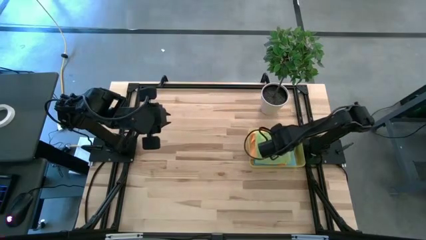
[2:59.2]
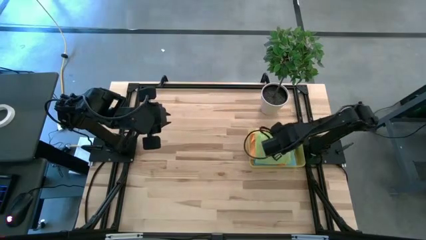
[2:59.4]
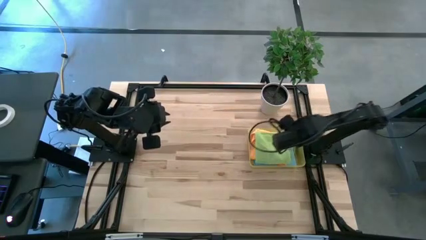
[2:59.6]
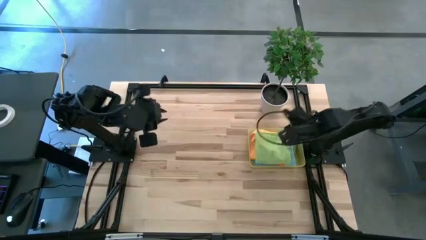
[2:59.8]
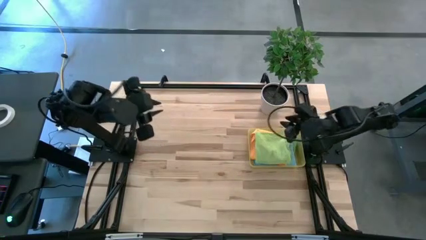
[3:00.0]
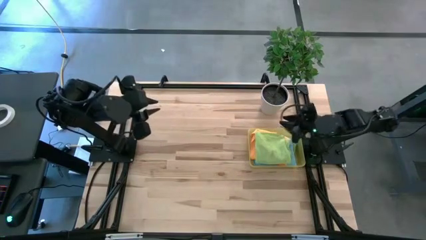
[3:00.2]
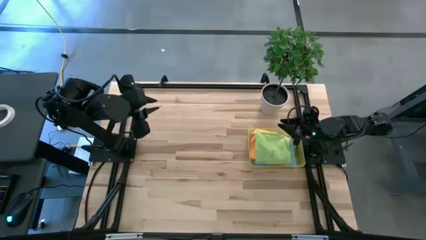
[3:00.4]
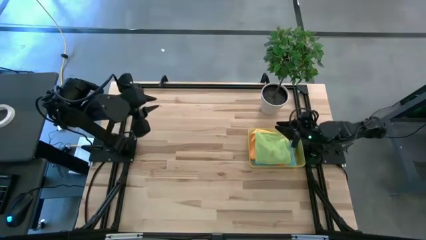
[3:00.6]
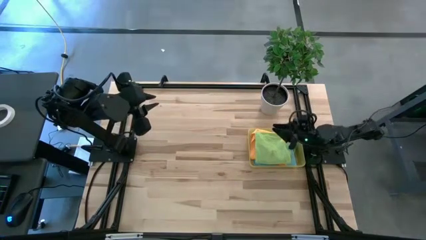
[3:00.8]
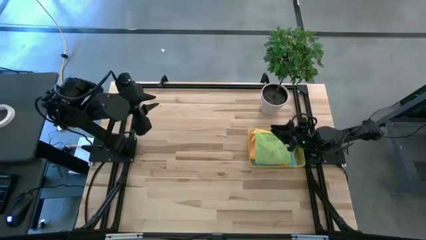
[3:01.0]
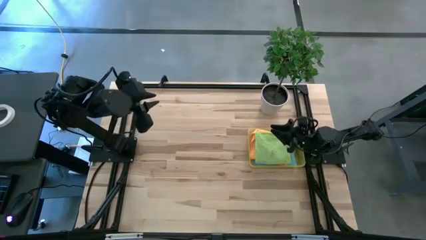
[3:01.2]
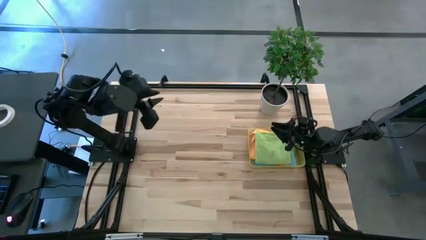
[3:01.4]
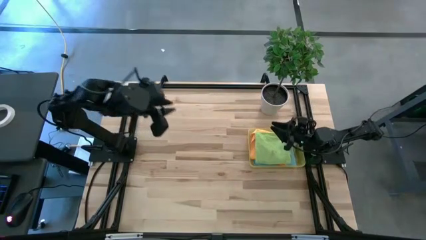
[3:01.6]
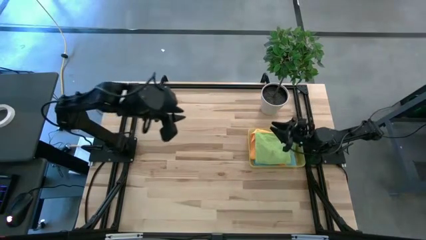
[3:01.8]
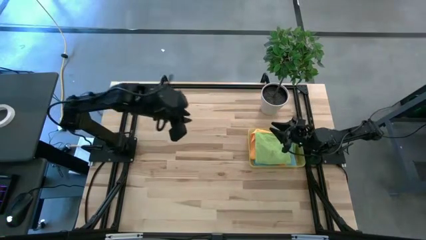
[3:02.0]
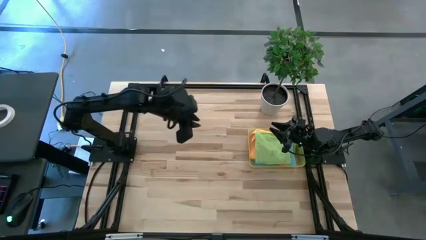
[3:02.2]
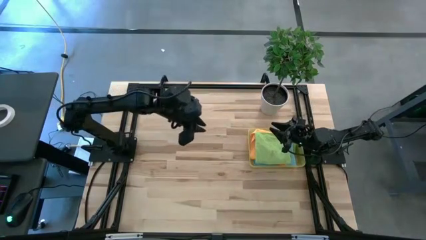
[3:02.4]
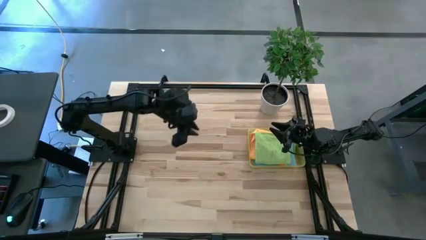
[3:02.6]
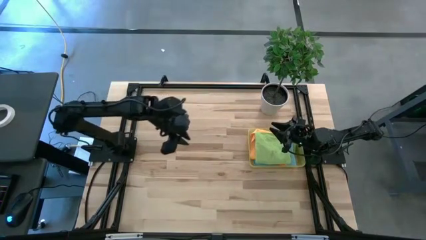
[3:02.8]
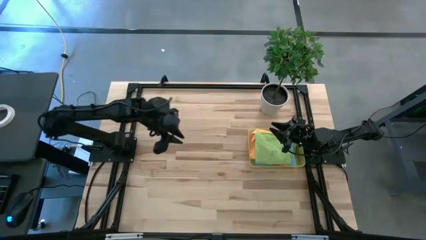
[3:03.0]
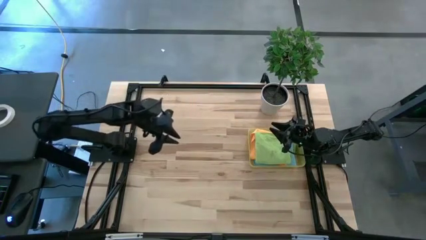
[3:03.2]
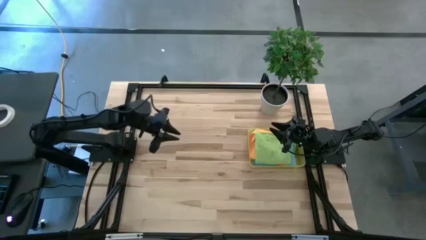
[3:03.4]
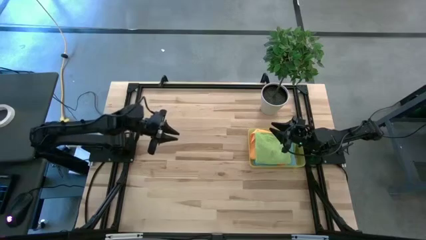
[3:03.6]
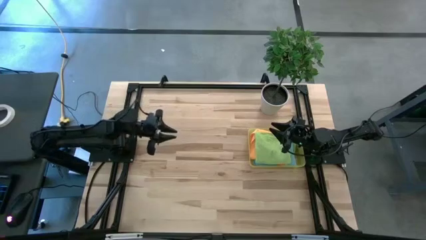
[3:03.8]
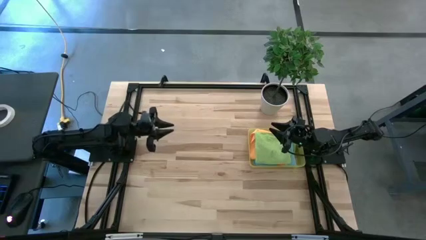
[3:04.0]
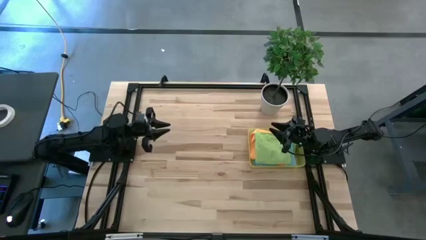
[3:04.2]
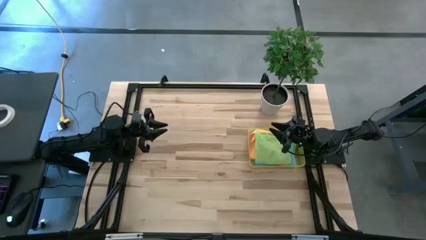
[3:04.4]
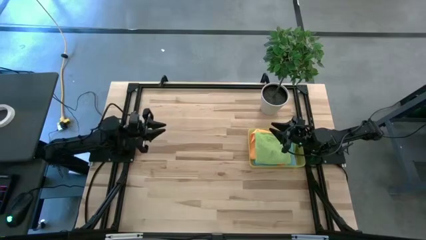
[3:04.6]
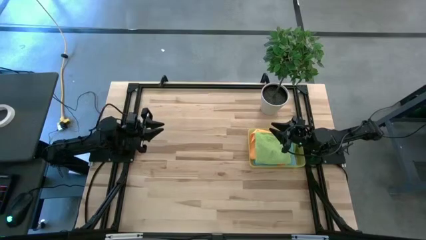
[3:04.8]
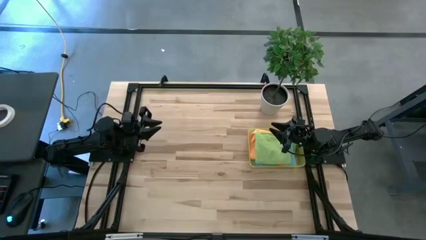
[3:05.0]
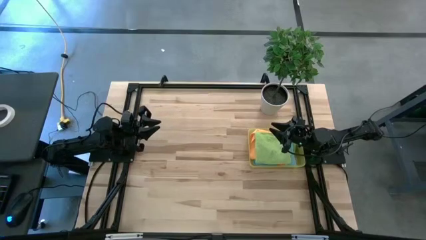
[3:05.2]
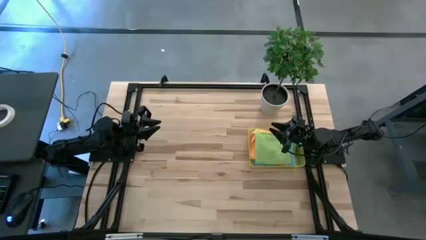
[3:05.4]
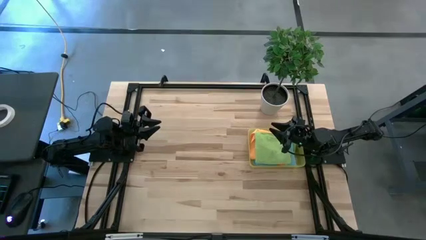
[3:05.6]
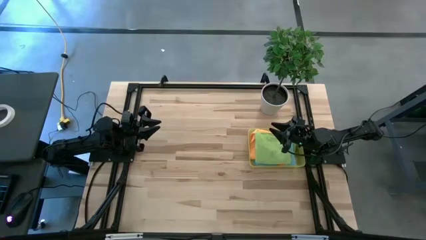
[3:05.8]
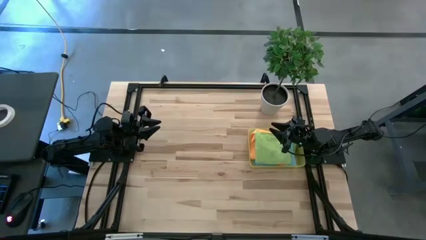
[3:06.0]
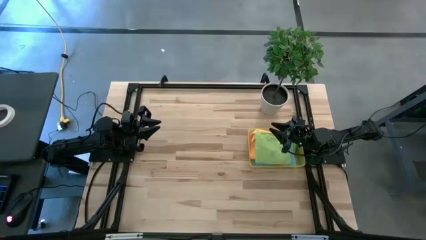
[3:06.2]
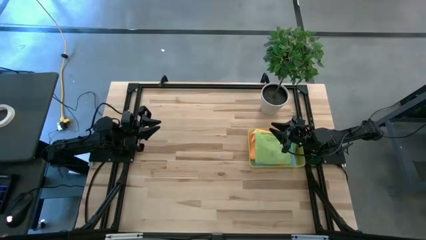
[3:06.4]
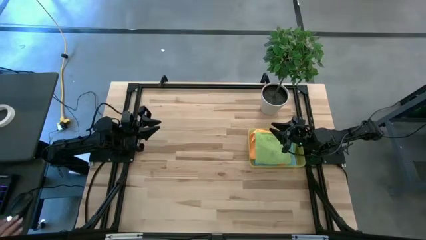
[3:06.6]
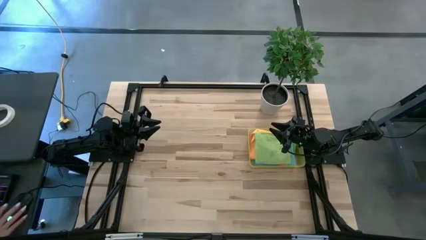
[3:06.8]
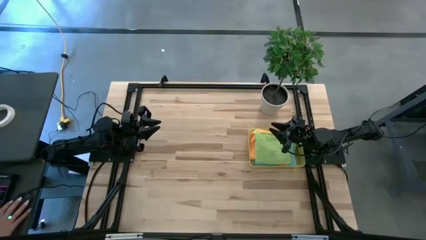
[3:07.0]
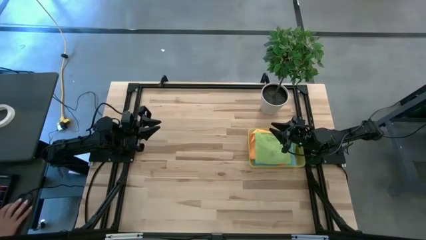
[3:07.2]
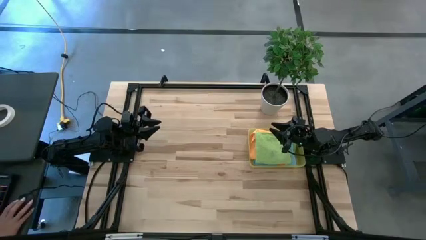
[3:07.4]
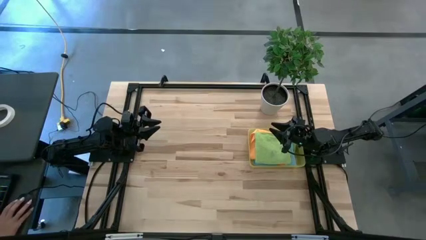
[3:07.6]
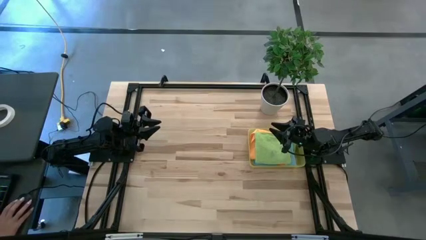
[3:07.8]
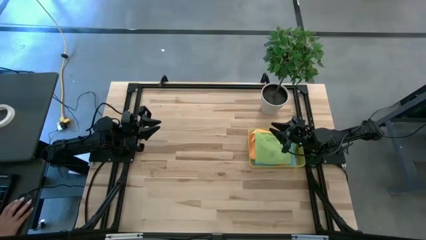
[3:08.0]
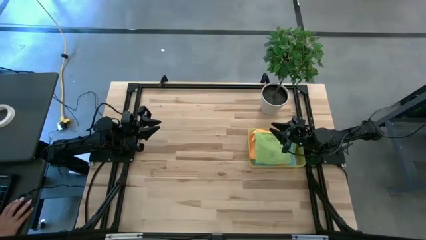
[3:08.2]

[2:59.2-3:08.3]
Task: Fold microfiber towels
Return to Home Position

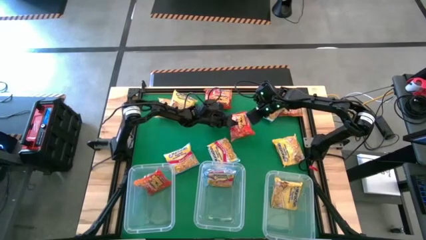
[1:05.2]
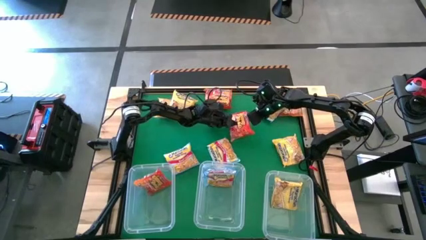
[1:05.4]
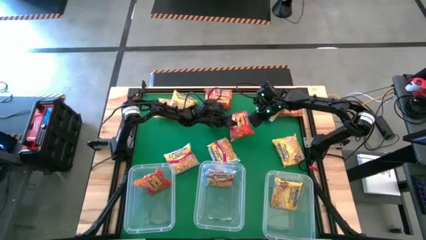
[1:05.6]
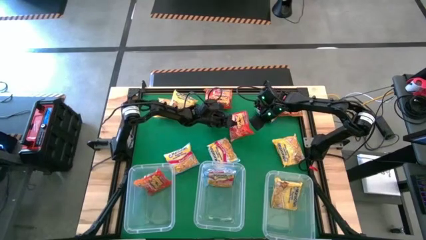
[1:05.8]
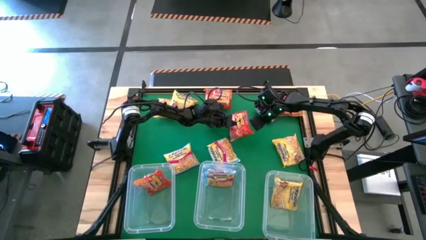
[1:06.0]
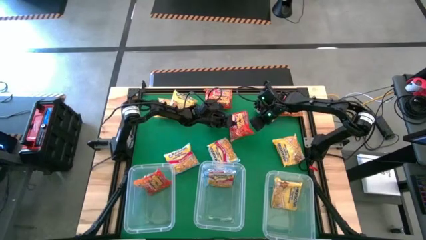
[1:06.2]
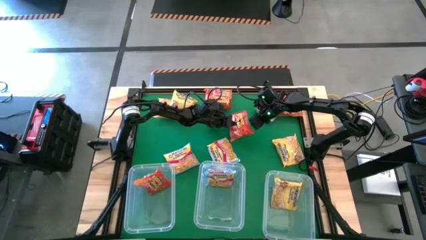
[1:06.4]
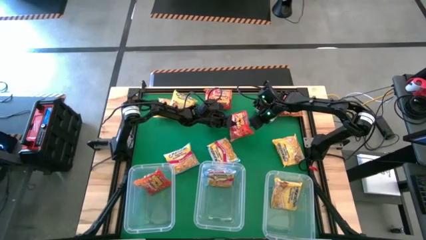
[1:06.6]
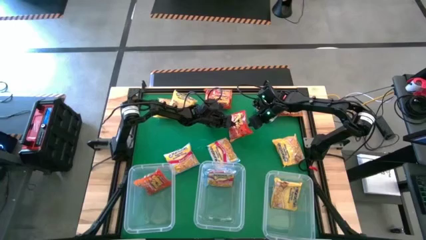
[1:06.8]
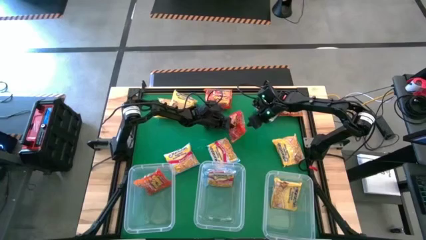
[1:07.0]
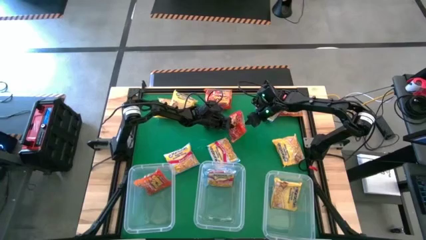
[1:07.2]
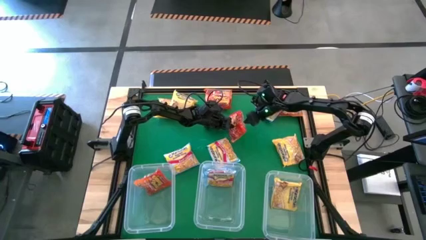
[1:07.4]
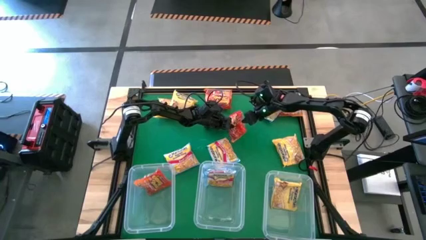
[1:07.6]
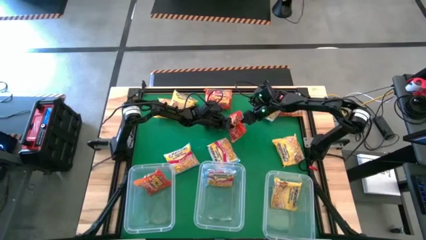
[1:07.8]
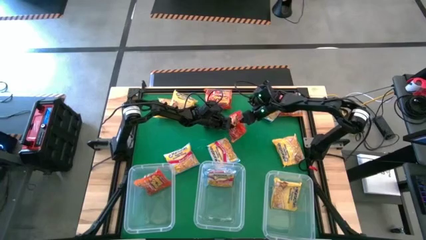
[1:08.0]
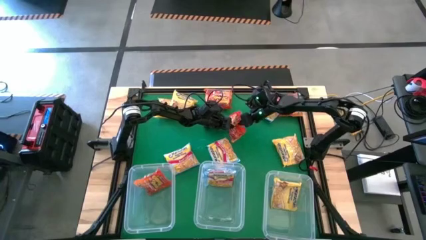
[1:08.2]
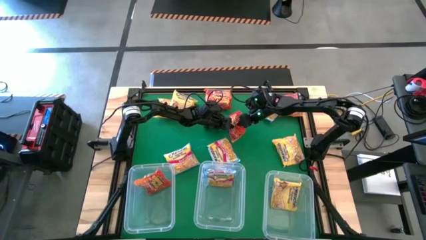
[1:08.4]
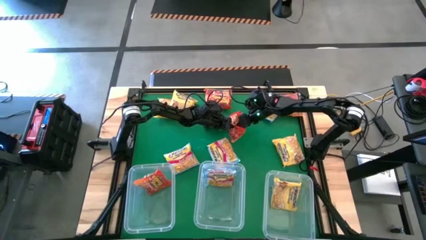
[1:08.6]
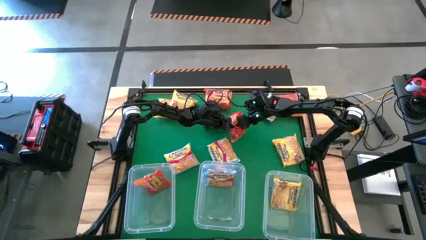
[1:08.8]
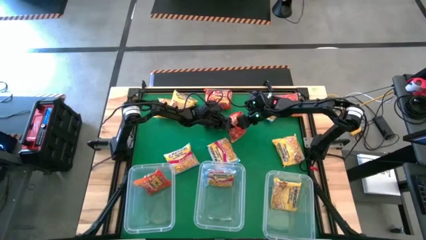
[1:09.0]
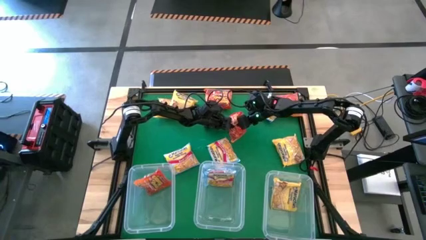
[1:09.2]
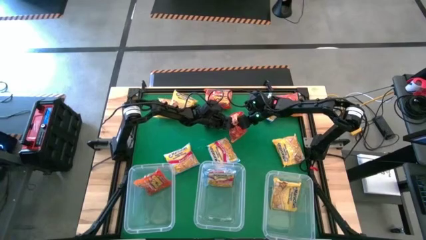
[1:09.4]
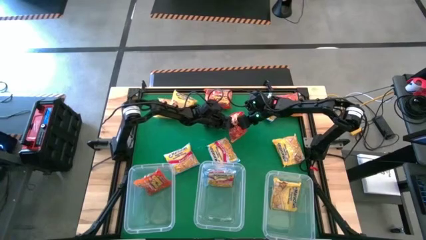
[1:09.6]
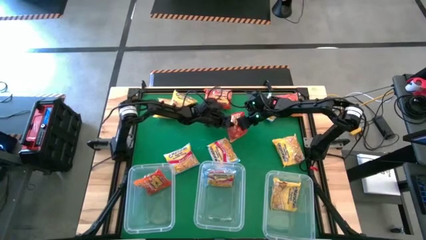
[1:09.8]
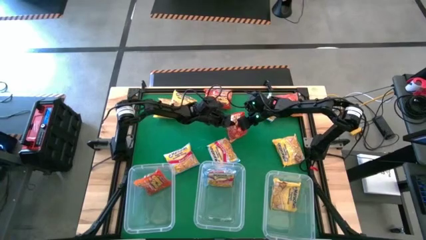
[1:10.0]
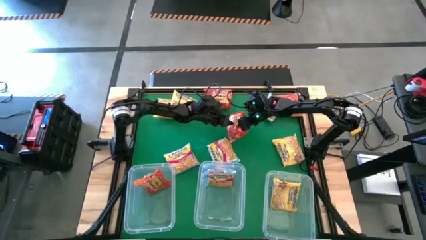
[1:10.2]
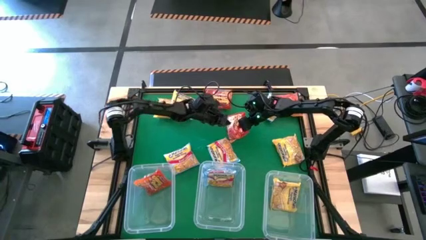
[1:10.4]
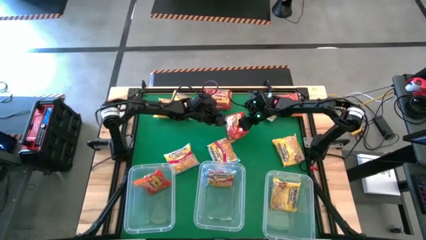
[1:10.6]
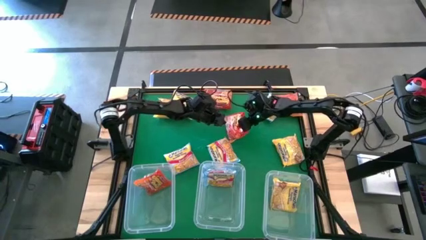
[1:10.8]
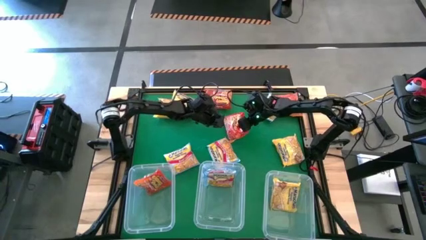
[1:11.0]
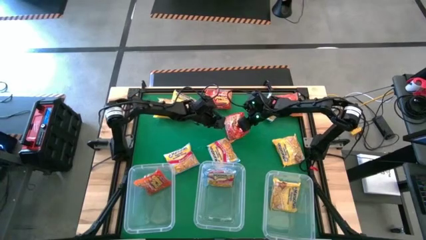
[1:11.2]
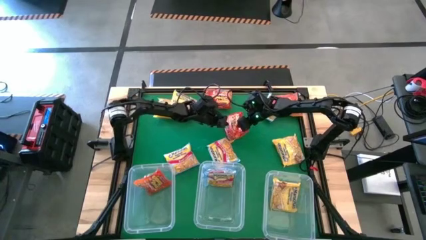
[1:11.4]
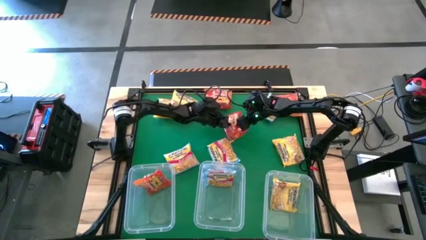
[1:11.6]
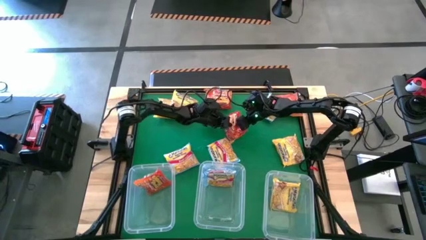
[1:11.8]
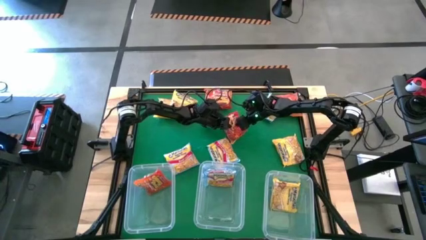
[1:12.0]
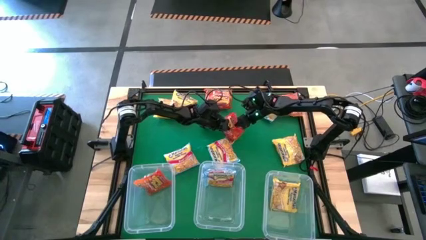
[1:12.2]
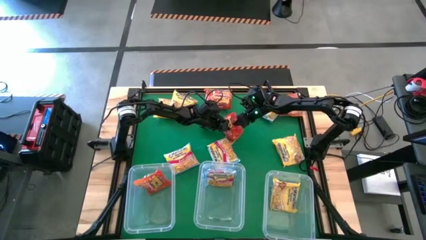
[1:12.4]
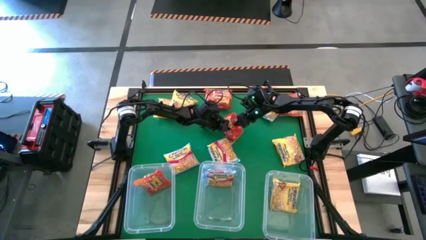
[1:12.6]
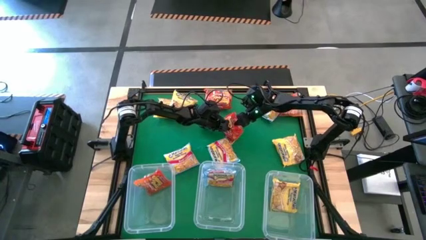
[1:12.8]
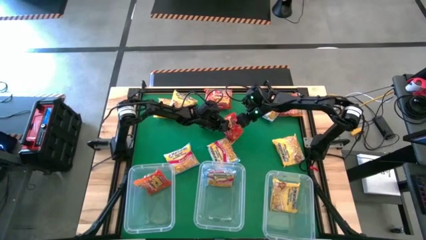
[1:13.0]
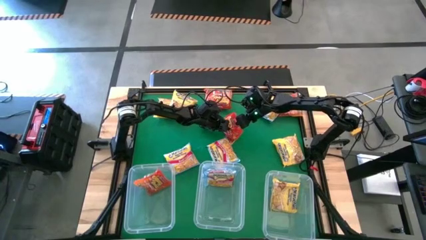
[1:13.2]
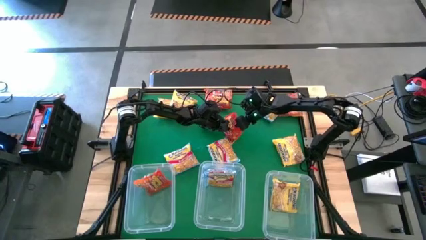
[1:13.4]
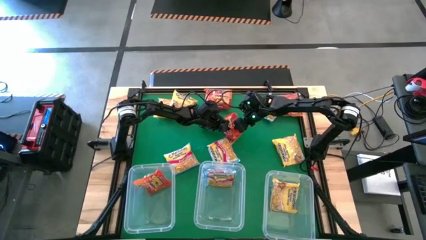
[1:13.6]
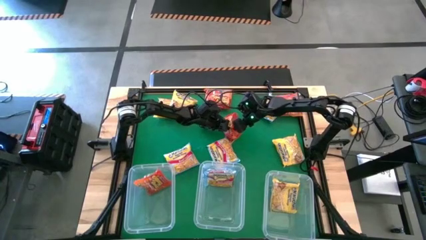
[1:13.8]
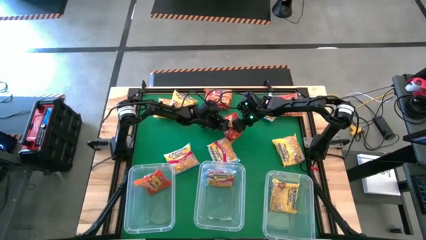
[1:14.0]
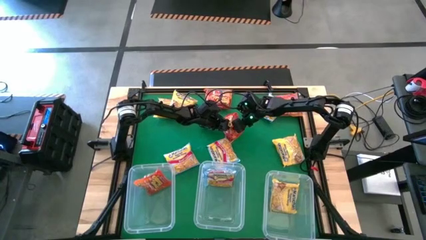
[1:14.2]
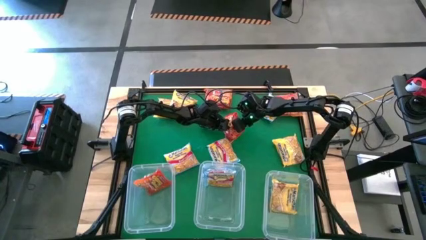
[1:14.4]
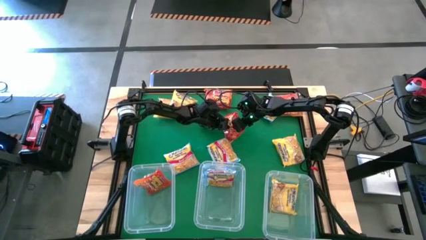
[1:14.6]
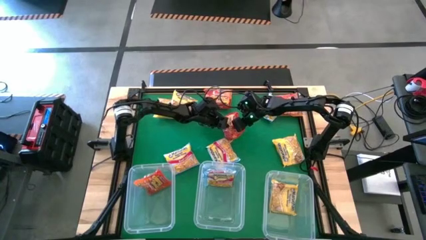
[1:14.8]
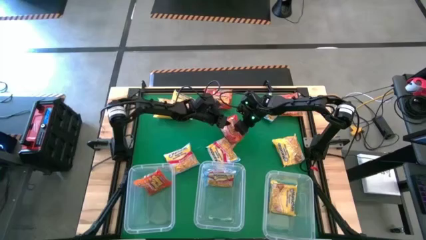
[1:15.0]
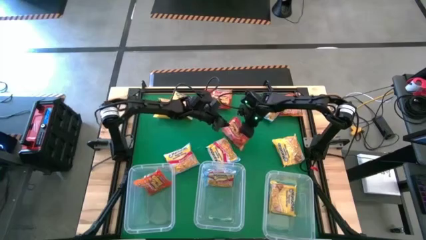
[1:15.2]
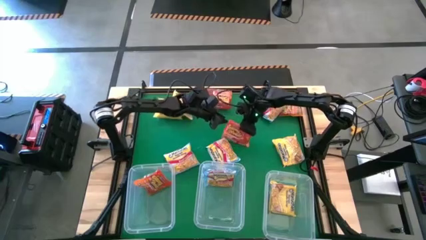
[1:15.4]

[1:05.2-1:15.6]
Task: Sort Maruchan noodles
Put the orange noodle pack into the left transparent bin
